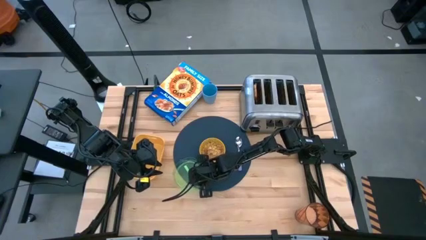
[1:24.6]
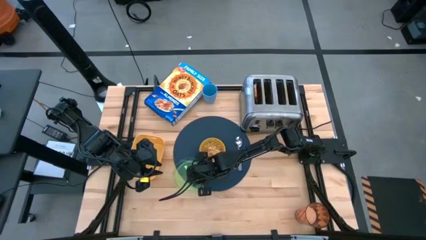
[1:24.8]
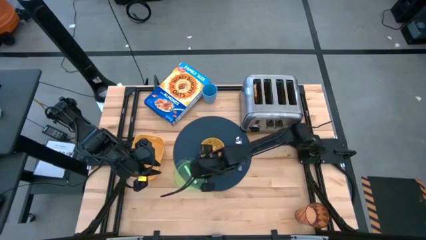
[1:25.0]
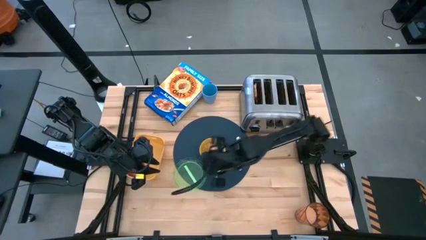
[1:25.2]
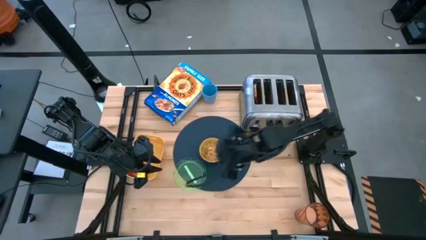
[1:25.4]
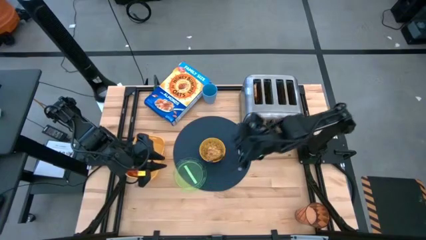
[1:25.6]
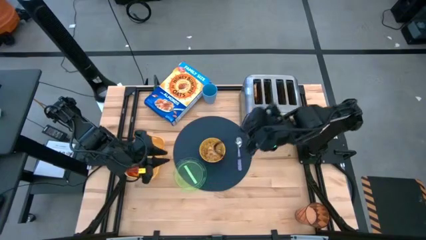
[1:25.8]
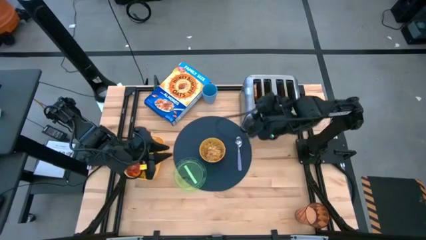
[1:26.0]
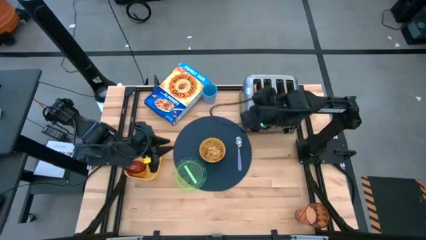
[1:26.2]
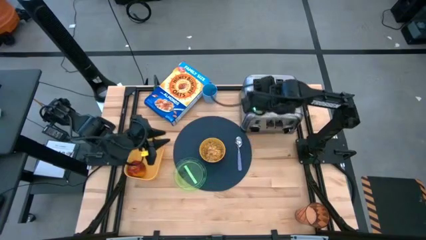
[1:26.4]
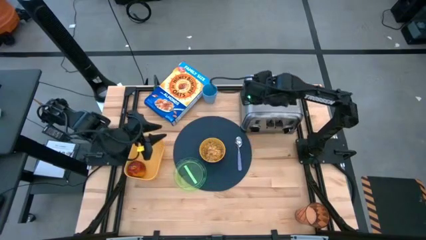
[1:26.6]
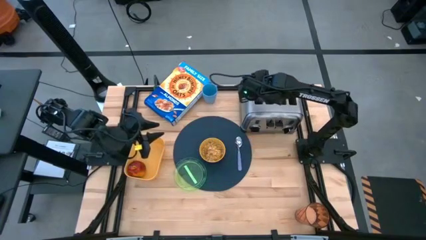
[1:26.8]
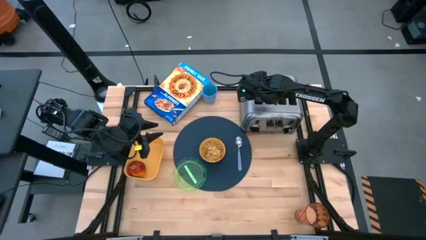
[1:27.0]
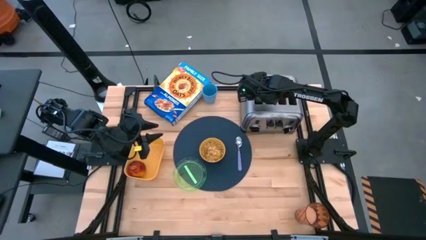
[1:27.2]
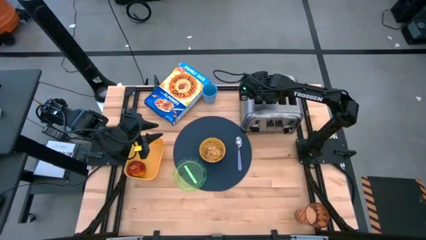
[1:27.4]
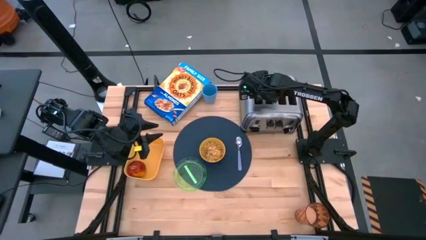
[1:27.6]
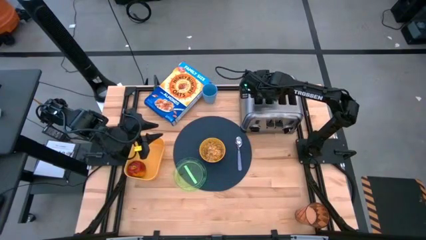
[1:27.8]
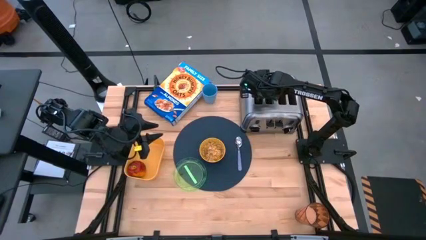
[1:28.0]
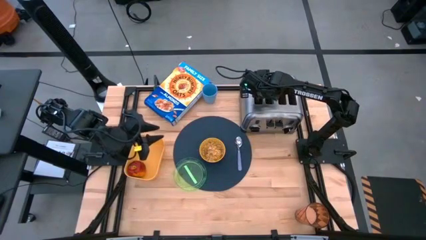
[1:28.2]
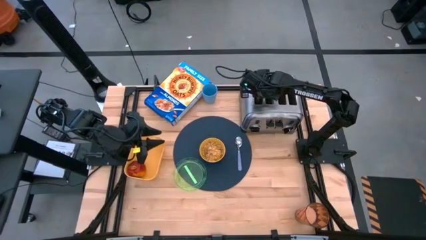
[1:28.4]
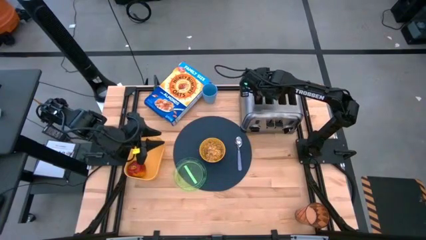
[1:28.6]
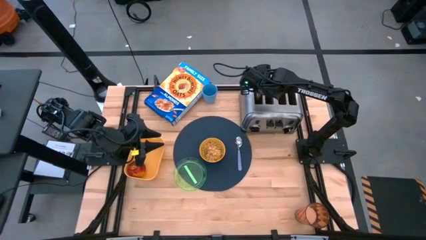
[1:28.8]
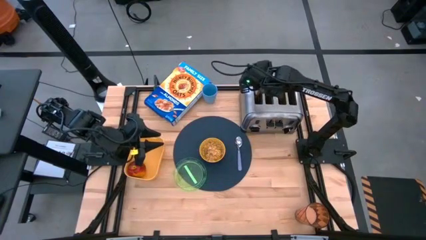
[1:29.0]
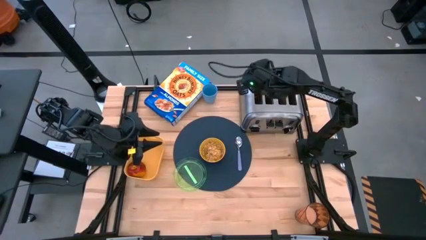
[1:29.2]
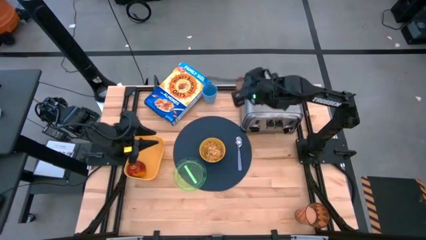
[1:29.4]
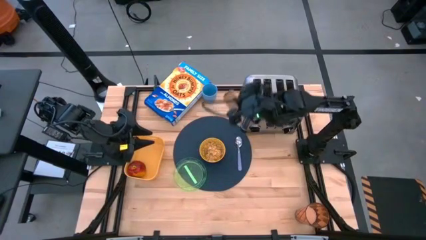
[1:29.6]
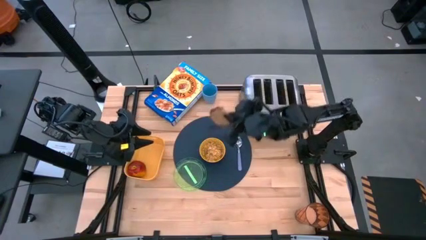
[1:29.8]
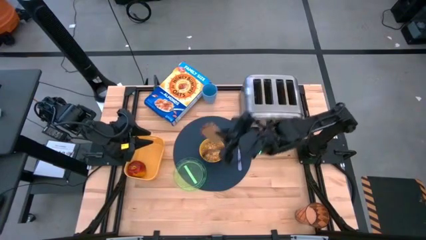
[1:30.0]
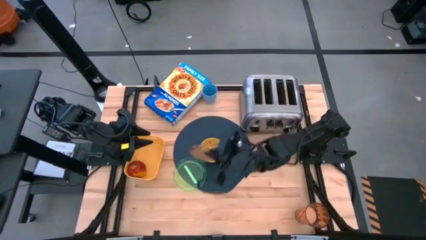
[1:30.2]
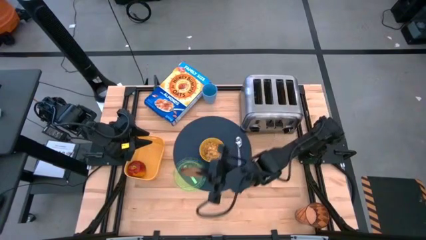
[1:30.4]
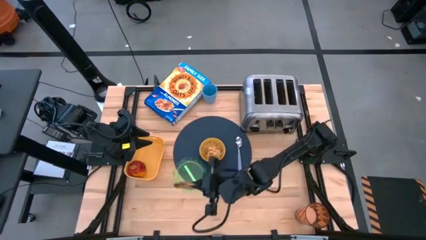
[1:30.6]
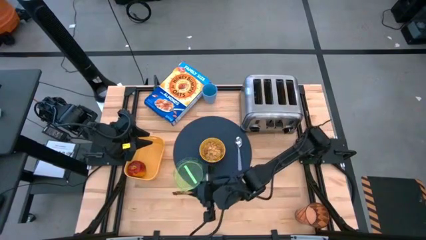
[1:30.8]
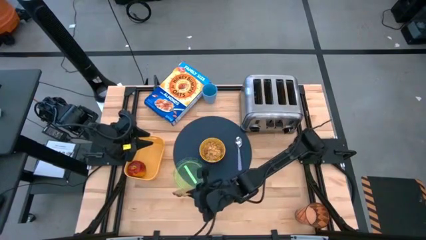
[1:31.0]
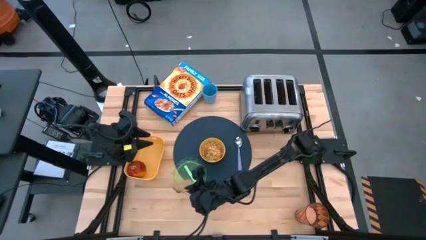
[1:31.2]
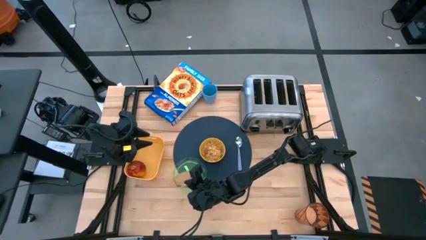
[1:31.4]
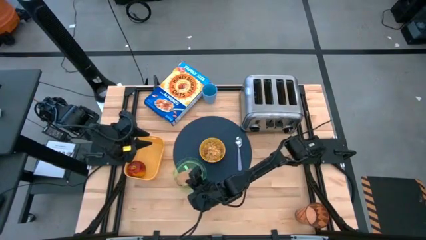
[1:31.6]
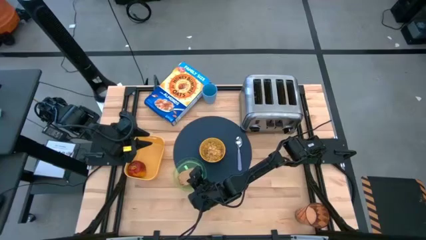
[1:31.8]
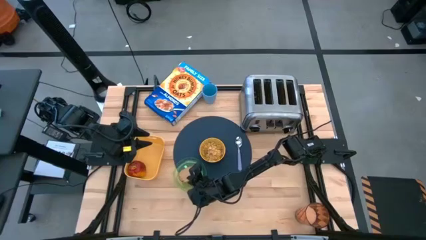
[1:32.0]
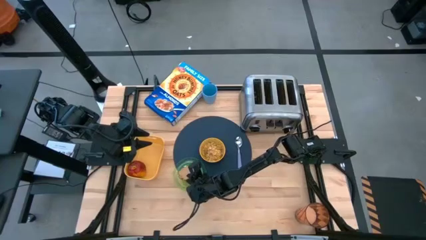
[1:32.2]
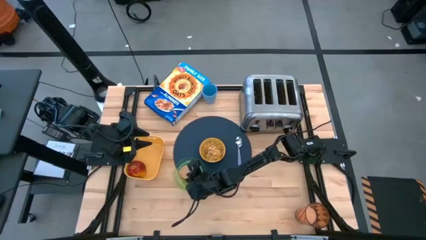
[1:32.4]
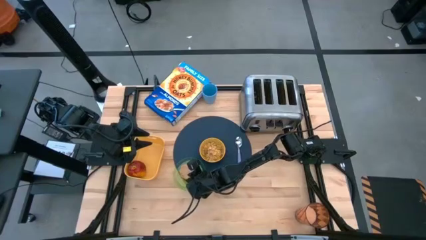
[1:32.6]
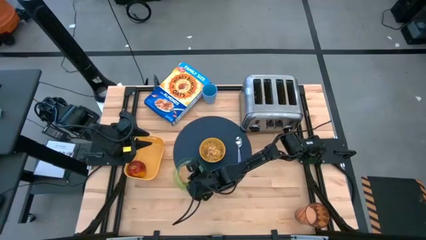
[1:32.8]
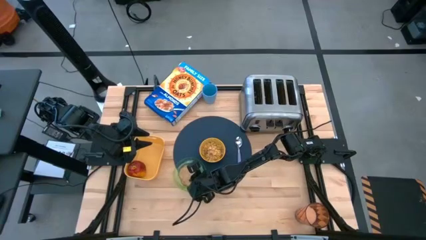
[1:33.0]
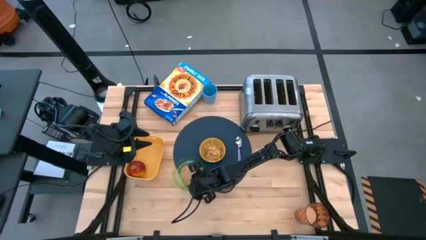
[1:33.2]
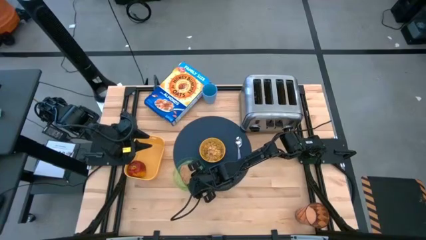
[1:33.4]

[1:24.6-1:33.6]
Task: Arrange a breakfast setting
Put the bread on the plate

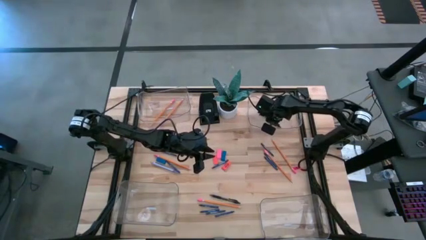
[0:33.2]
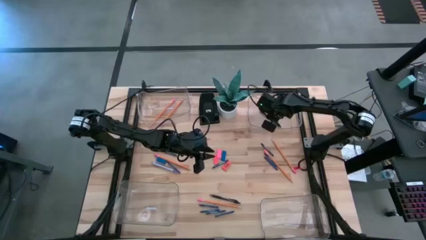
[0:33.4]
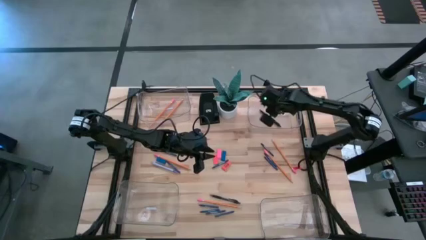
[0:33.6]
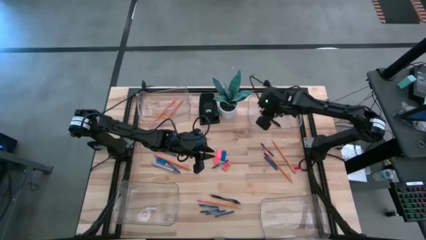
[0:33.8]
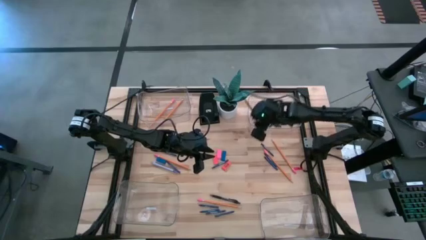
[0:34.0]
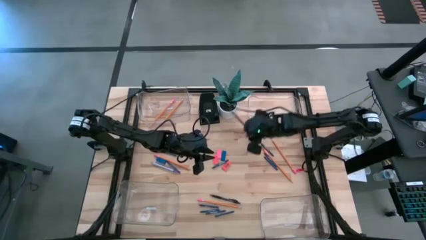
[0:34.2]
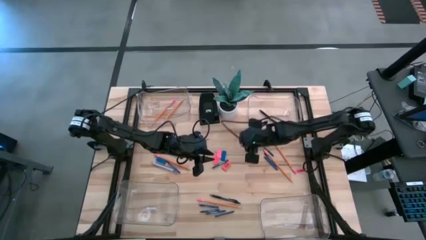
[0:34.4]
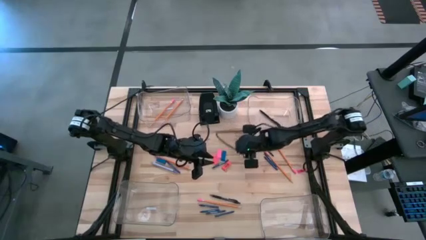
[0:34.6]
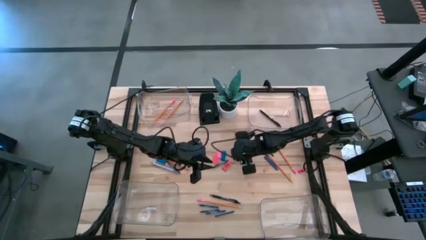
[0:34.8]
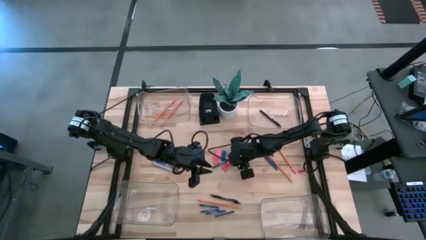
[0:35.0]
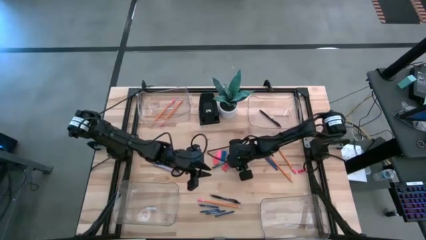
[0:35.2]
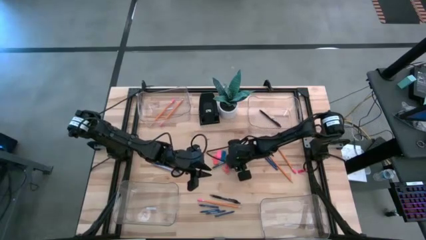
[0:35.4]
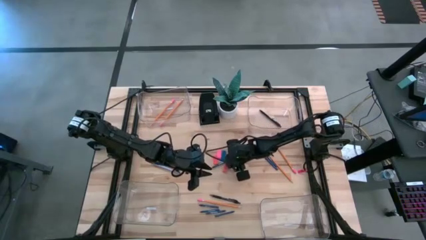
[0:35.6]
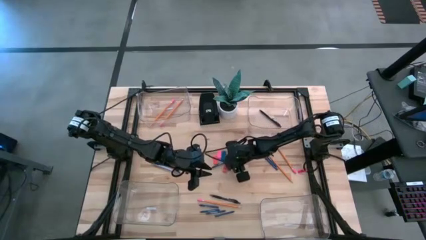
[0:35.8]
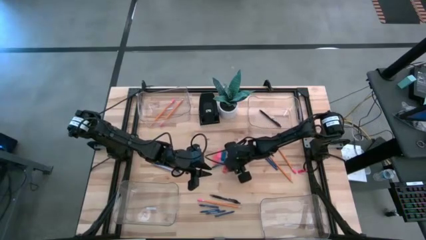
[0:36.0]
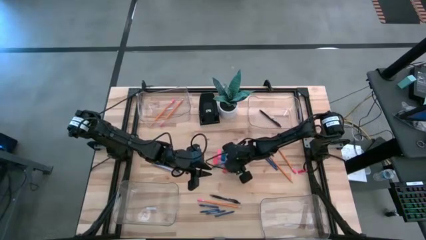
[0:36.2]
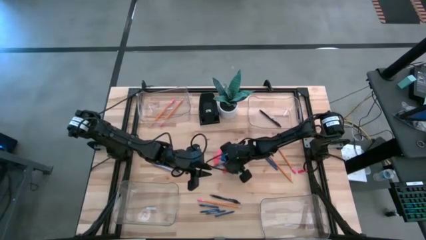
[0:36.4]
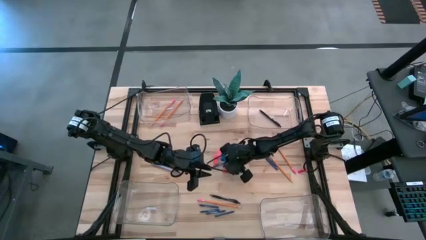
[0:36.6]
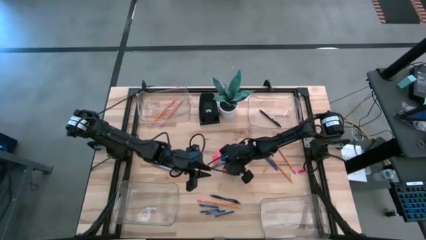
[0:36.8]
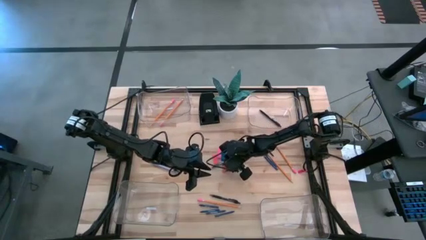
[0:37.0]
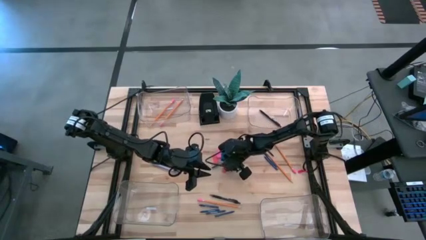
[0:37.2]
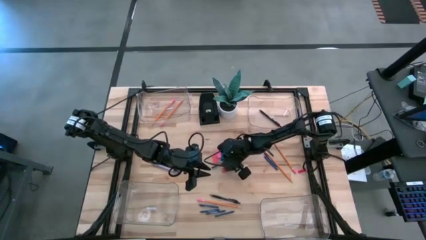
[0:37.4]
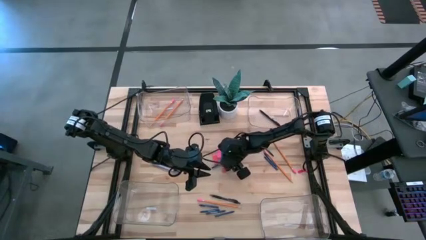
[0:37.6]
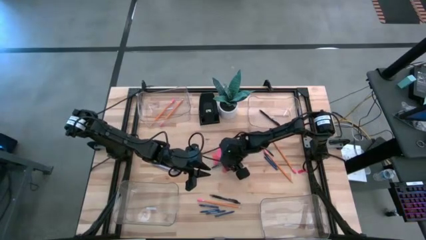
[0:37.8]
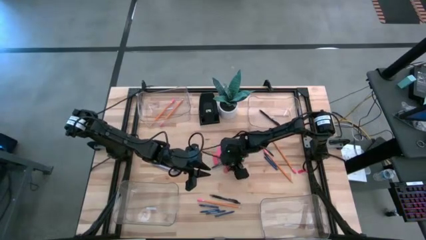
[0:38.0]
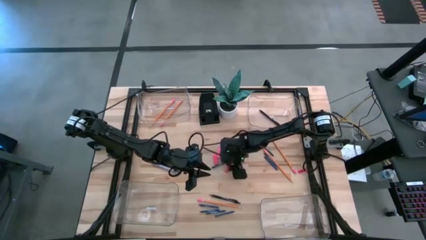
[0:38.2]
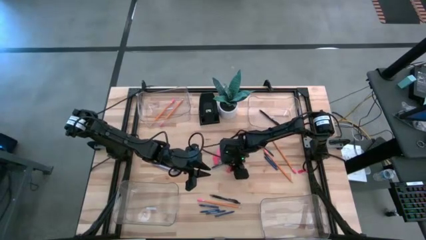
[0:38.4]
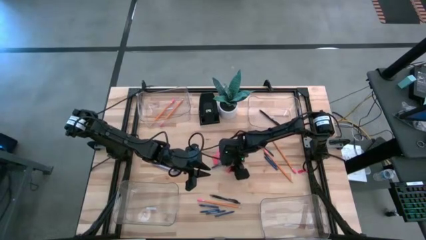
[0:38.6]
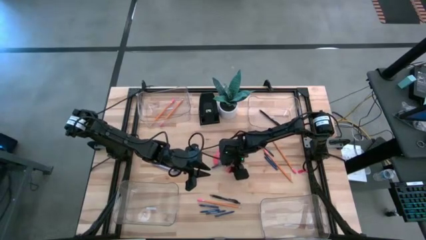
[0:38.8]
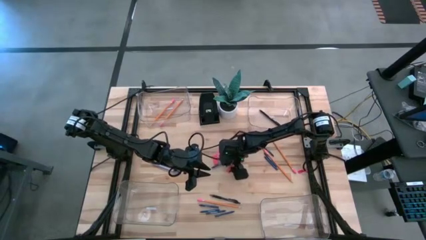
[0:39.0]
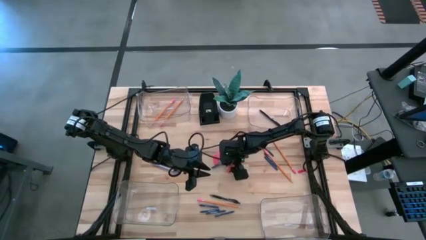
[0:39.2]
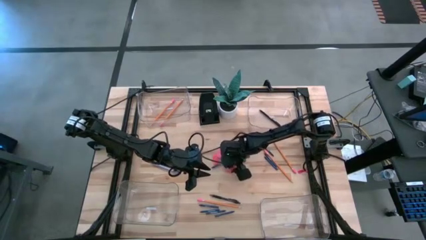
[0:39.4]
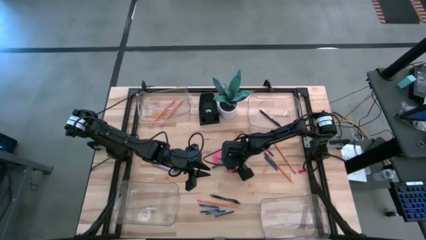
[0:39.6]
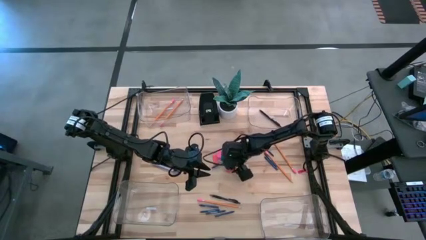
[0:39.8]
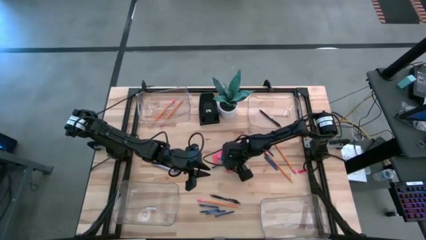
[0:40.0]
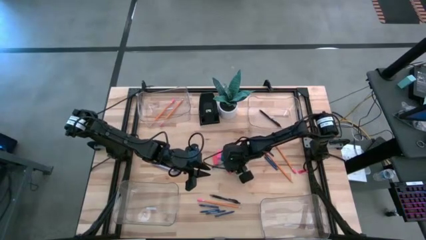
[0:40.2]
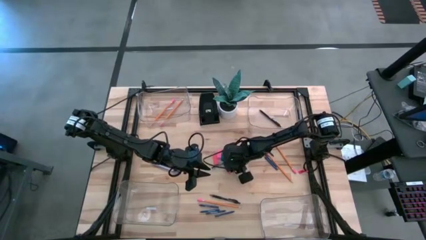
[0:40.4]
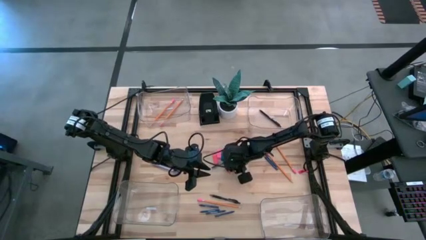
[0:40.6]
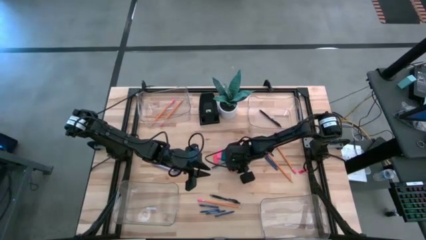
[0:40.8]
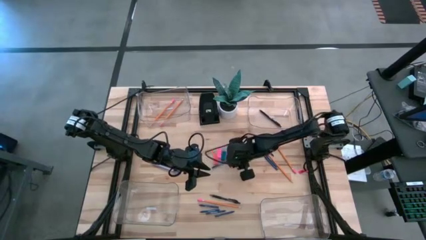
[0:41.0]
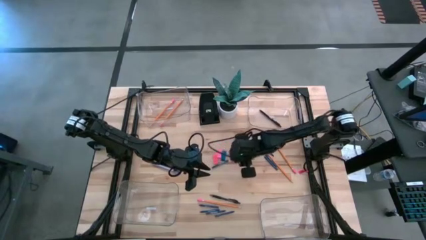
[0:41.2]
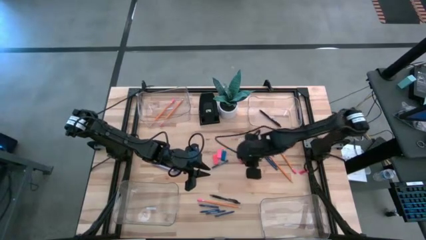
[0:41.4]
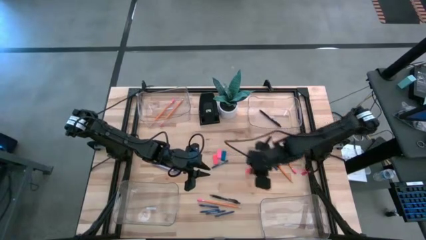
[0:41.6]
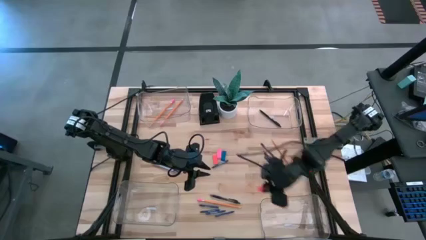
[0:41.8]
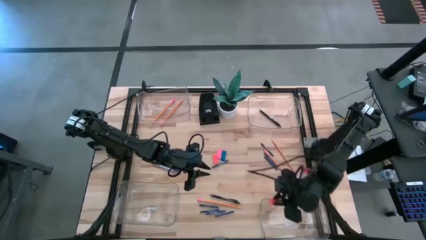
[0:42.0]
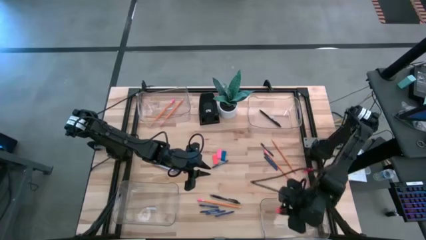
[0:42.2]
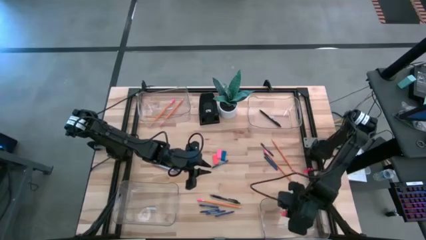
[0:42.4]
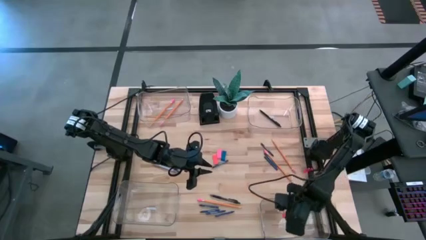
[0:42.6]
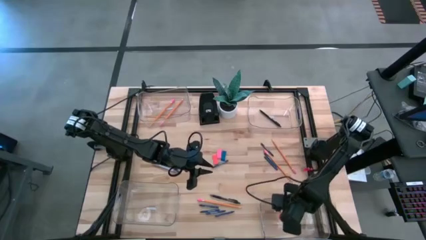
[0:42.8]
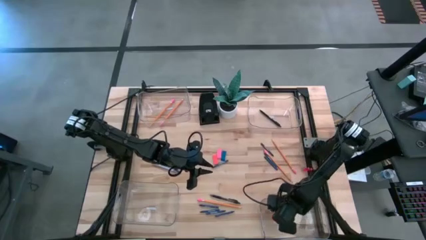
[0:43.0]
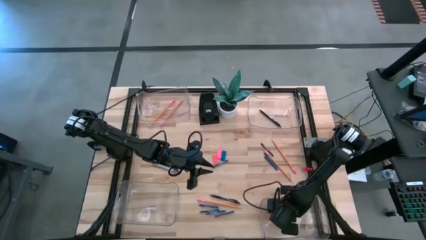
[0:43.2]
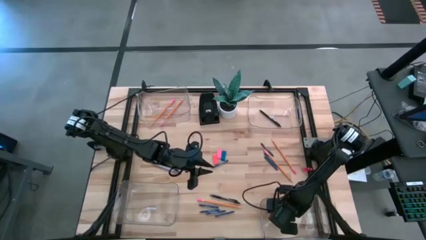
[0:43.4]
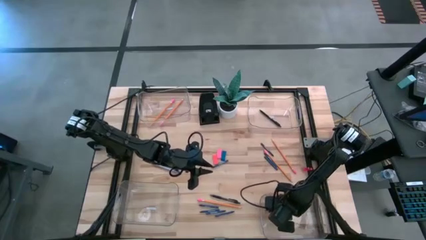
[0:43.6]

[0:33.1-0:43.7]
Task: Sort crayons/erasers/pens/pencils in bins
Put the orange eraser into the bottom right transparent bin
